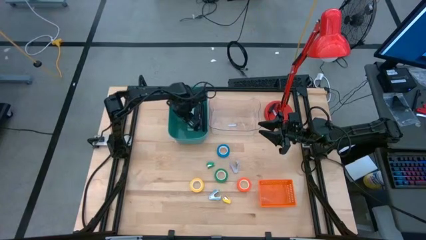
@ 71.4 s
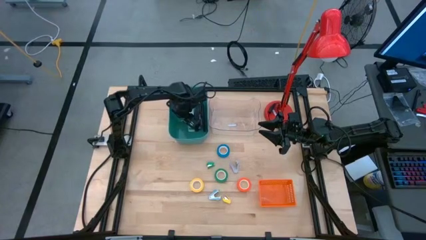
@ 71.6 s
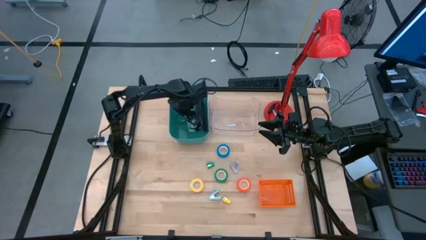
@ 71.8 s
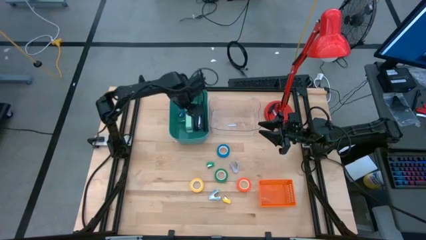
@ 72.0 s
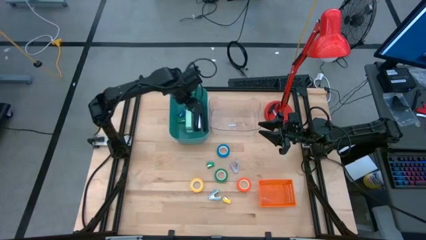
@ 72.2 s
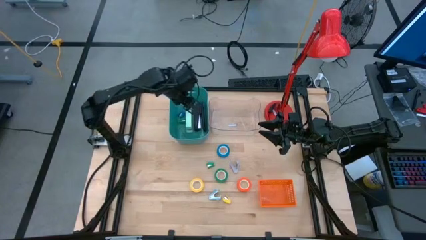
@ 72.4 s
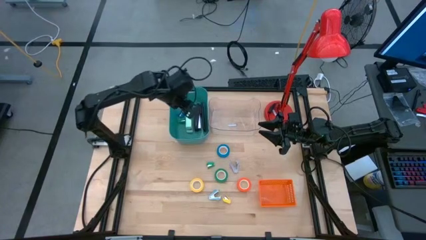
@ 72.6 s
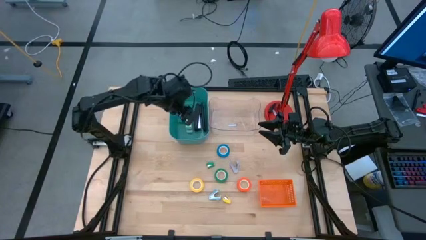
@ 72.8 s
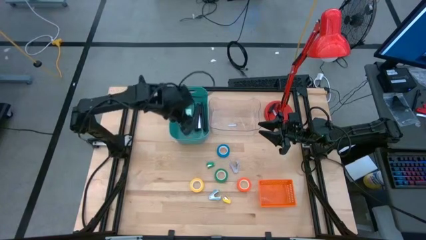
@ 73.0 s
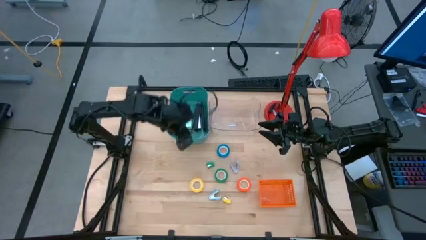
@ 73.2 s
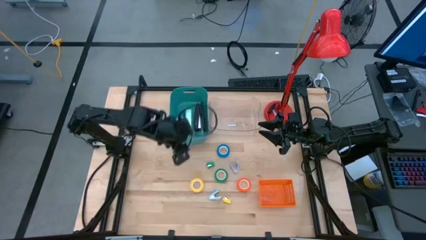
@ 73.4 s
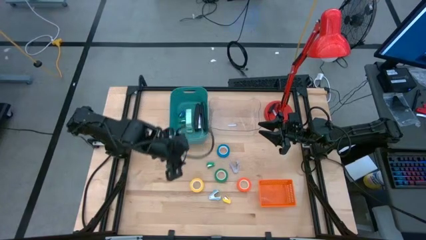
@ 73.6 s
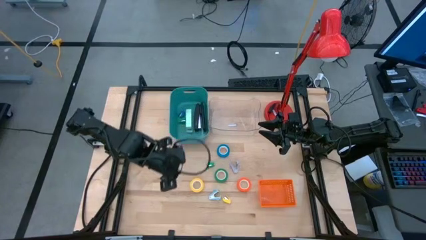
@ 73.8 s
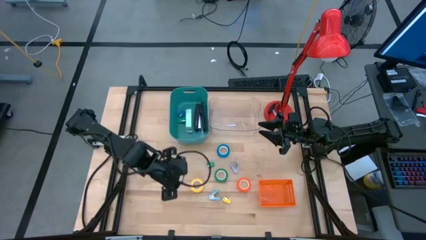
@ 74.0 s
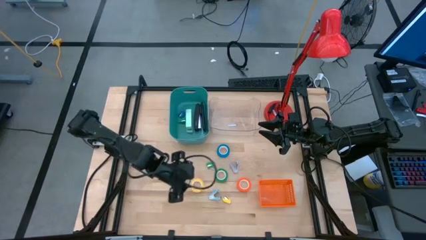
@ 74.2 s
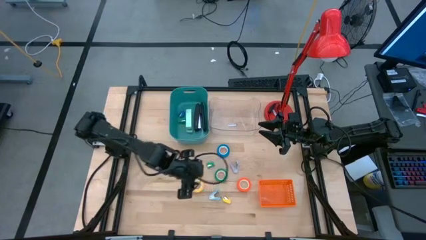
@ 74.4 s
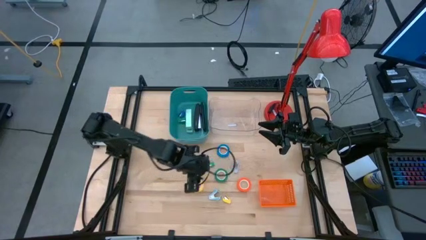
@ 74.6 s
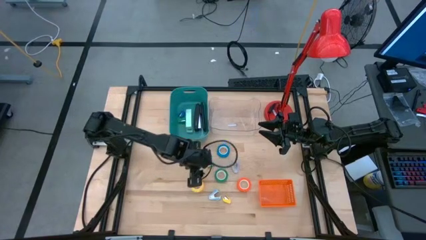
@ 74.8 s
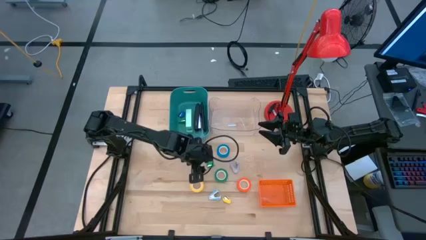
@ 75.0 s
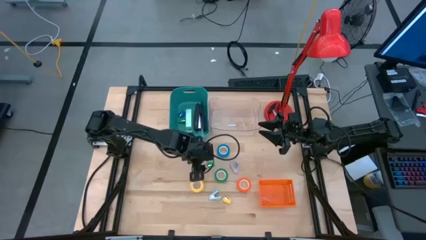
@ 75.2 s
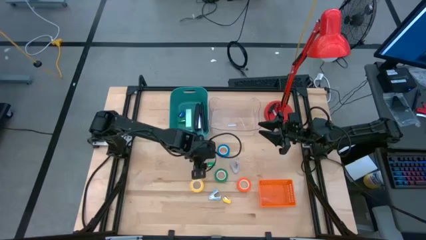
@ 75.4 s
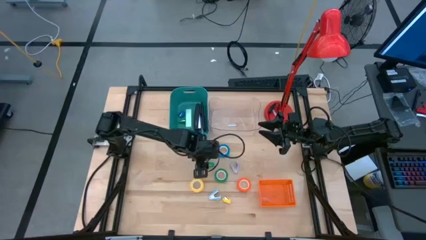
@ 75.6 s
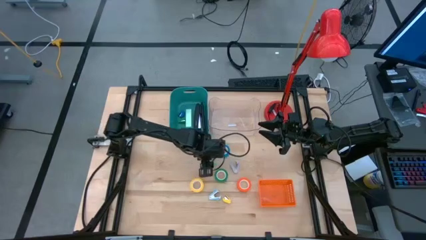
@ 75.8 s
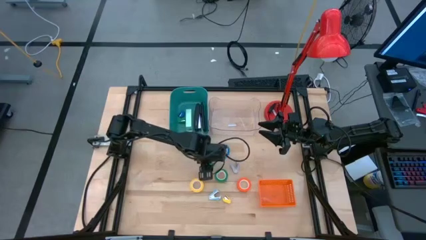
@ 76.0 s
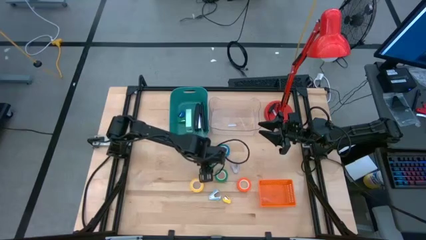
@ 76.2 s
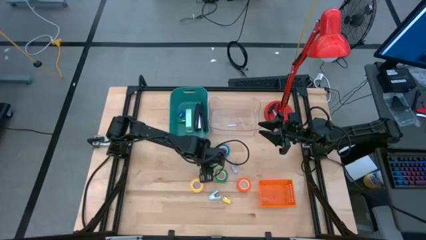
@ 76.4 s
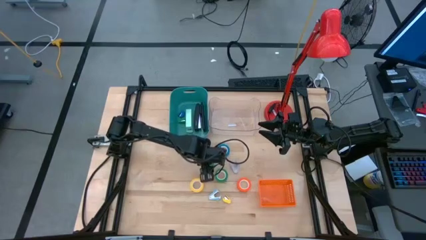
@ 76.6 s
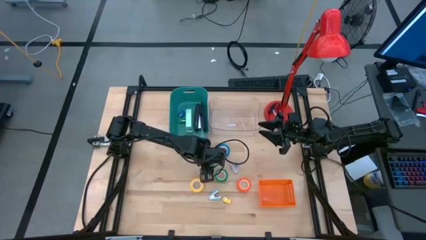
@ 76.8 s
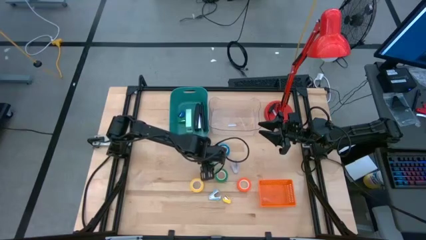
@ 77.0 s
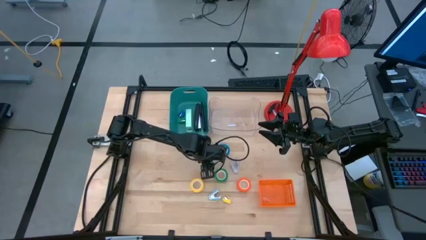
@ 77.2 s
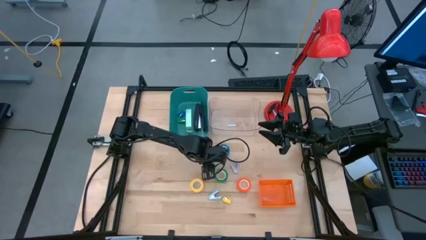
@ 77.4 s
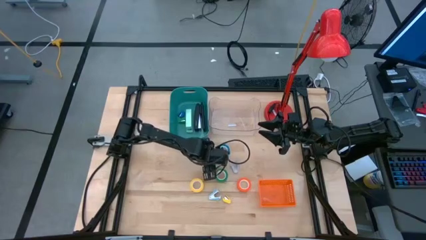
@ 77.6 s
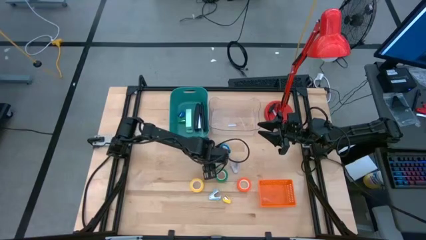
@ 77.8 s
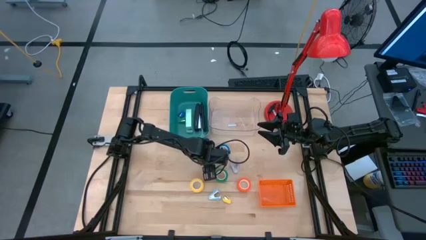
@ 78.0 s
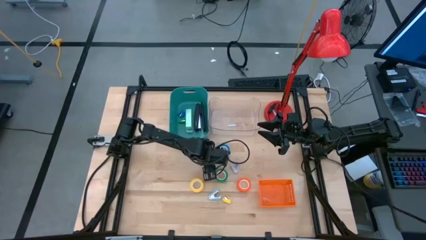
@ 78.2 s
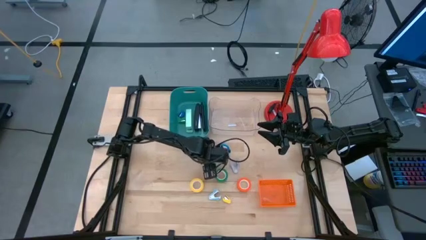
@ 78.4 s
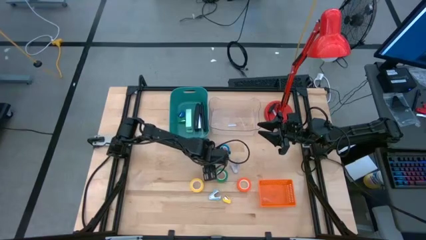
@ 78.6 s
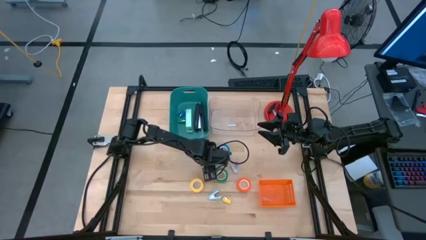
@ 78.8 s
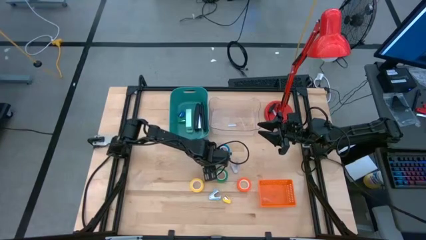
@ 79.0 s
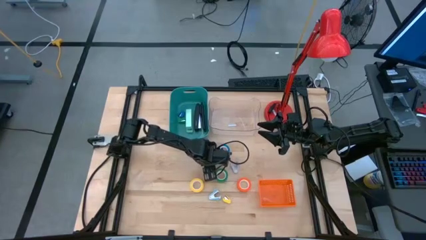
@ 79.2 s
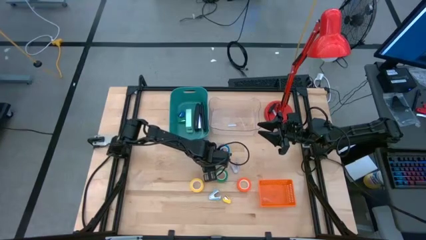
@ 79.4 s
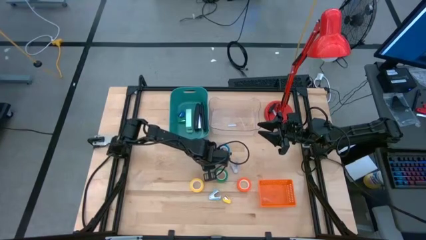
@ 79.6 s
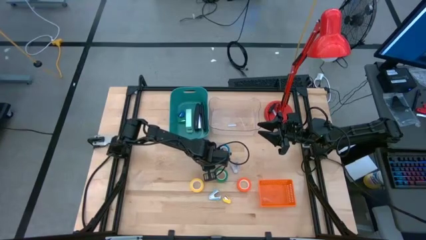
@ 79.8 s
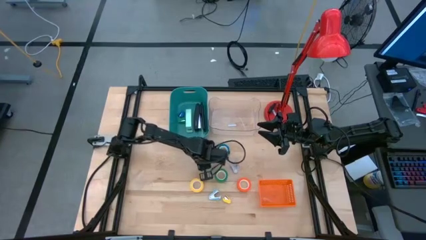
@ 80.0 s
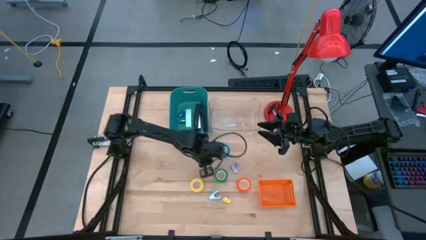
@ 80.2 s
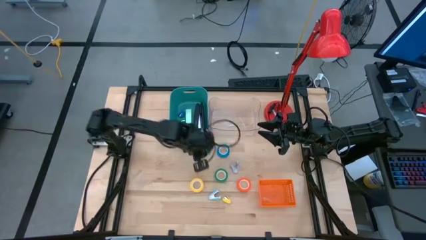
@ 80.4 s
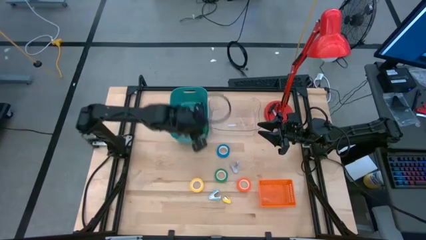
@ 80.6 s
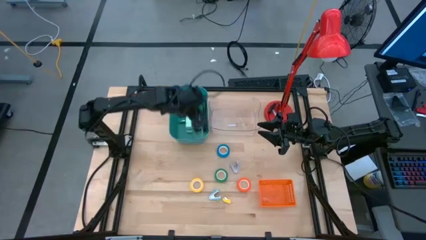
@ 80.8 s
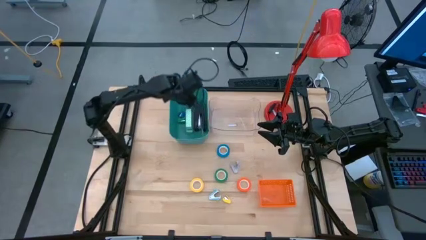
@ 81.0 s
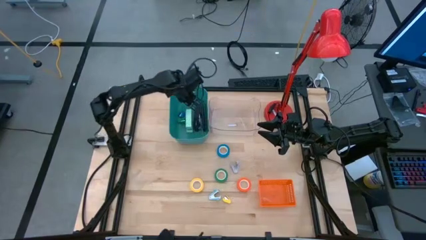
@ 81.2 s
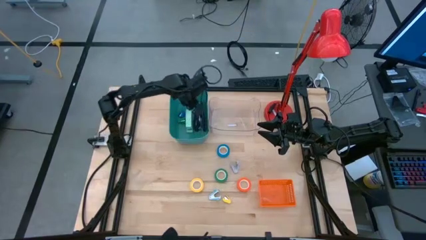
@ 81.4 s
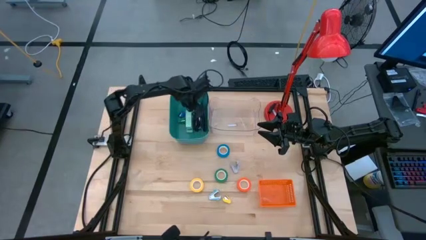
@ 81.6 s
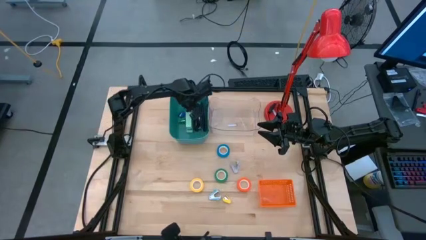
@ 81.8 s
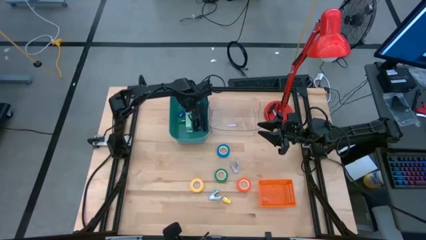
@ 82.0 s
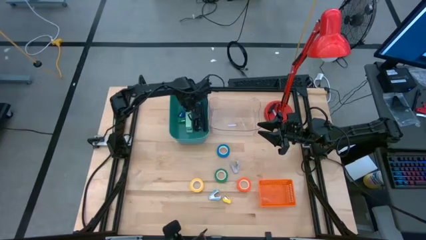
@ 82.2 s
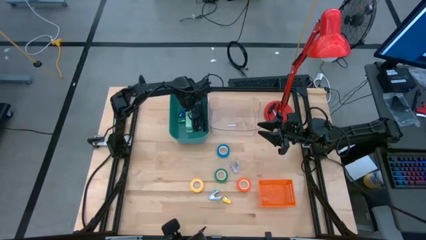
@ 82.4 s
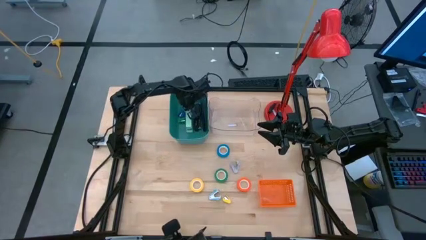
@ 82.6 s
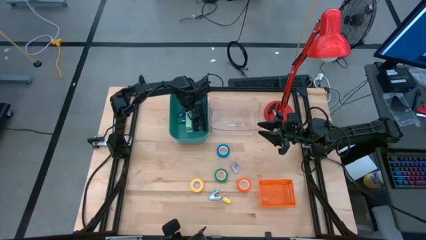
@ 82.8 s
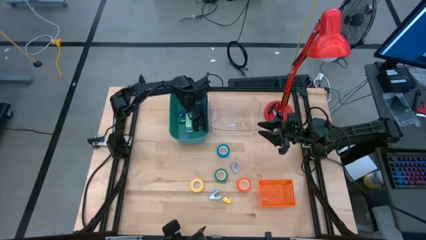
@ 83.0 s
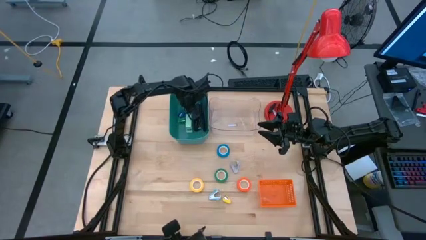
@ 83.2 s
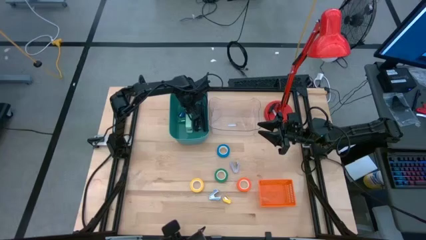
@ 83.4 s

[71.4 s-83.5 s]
Task: Pick and place Stapler, Stapler remover, tape
Put the small green stapler into the blue bin
